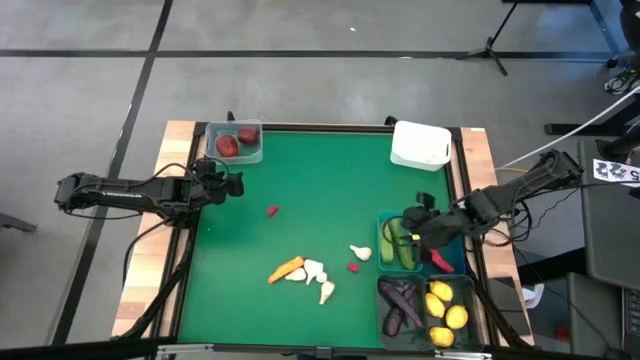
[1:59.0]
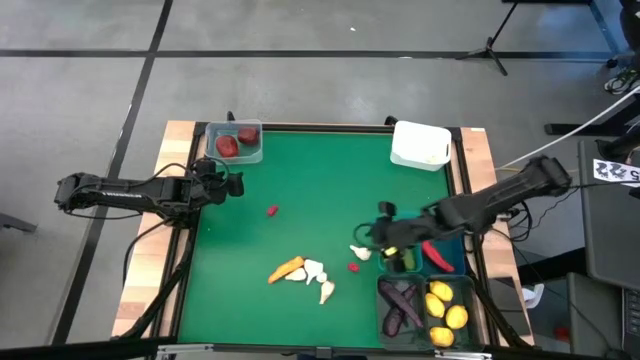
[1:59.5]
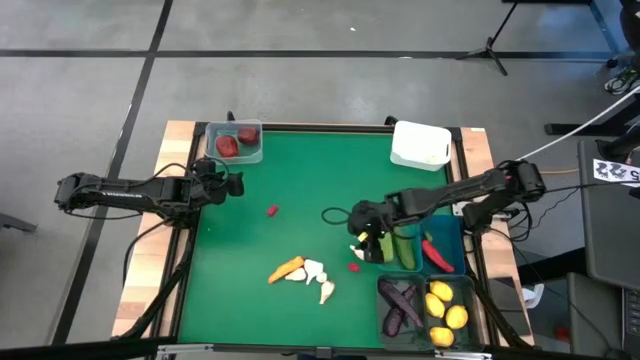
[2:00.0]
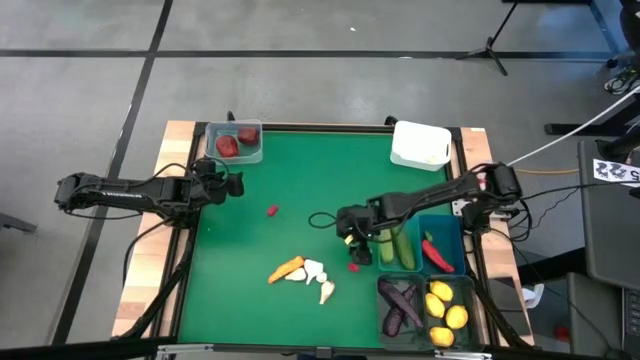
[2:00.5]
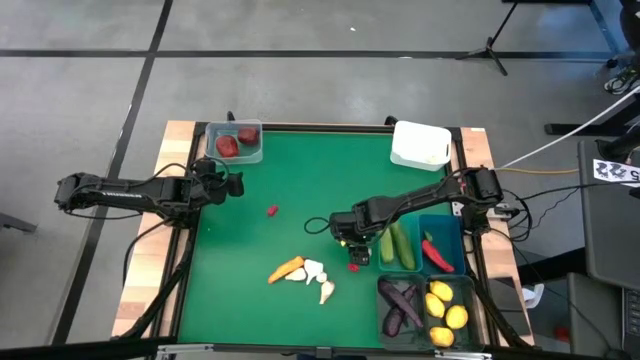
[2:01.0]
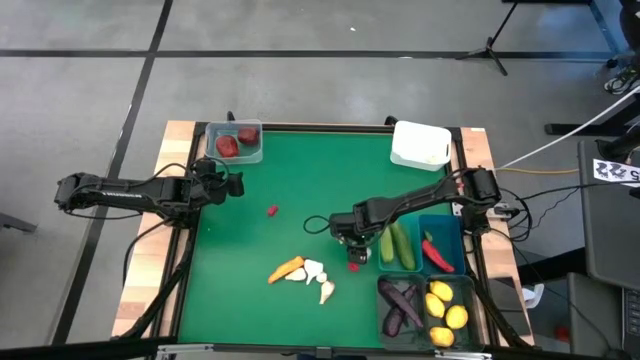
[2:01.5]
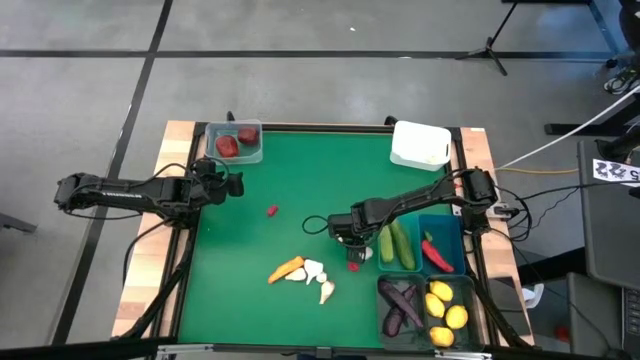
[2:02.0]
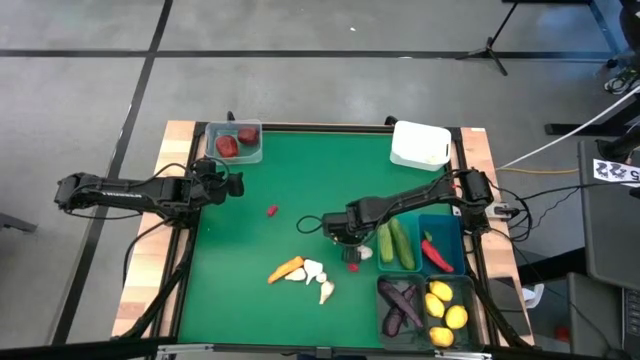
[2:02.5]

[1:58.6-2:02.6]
Task: Sort produce into baskets
Put the garlic into the white bin

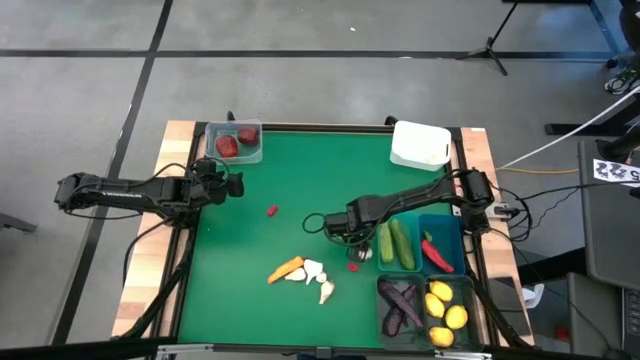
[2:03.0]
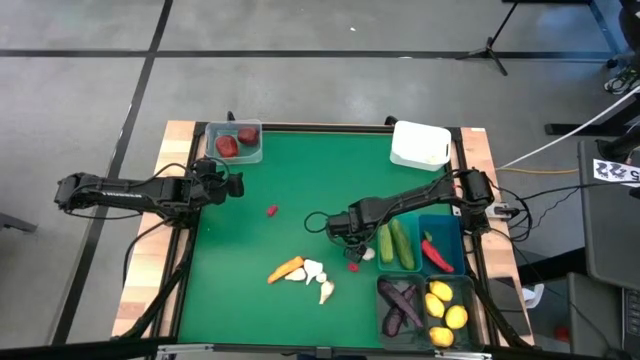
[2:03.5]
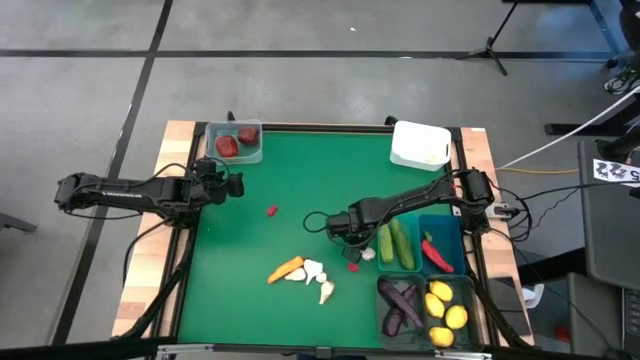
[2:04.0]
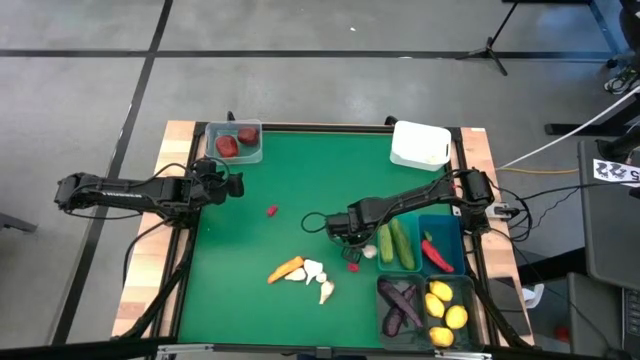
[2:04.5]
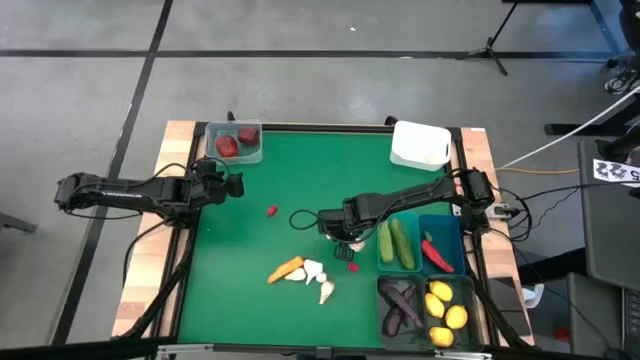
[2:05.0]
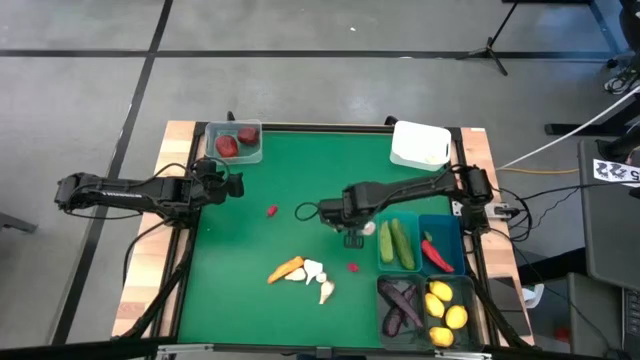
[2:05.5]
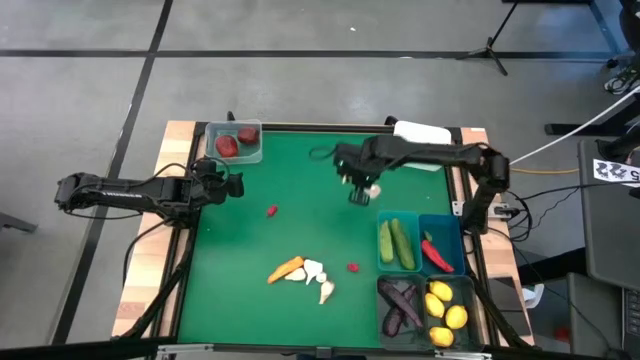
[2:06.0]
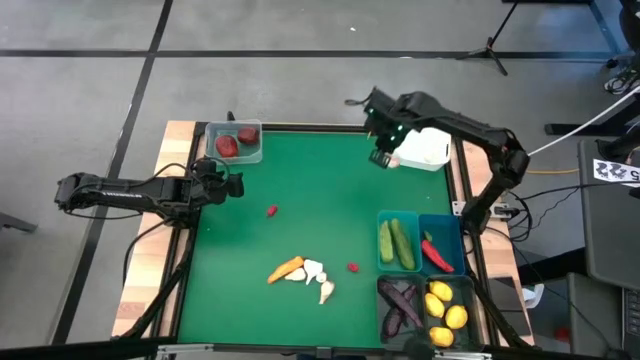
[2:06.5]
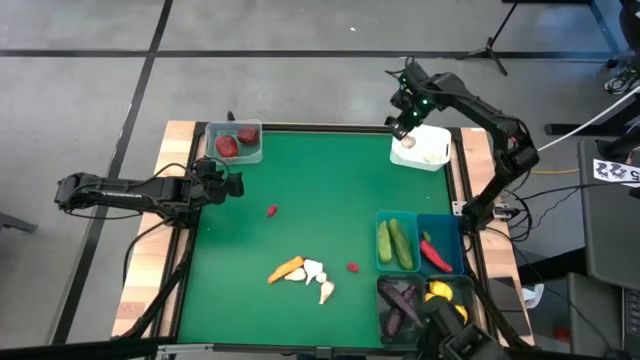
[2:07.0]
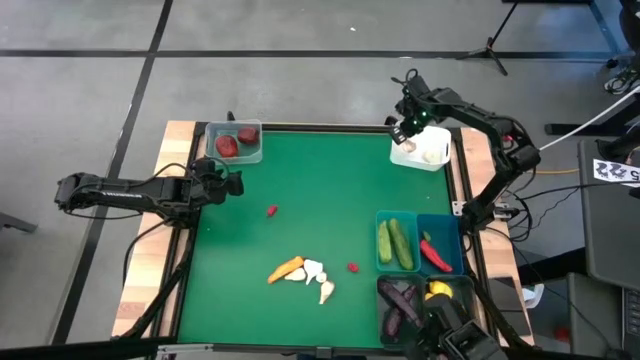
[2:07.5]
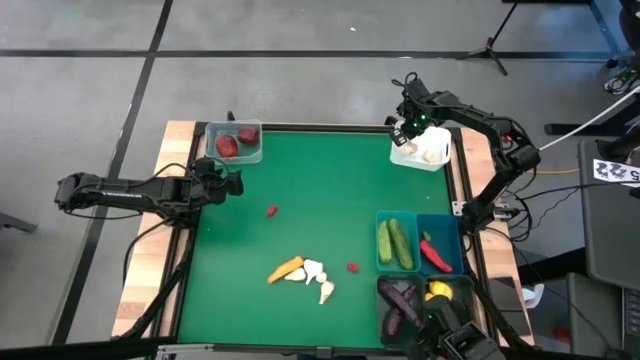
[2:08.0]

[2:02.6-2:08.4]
Put the garlic into the white bin

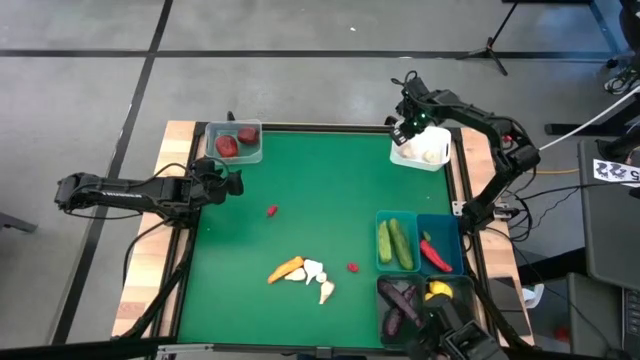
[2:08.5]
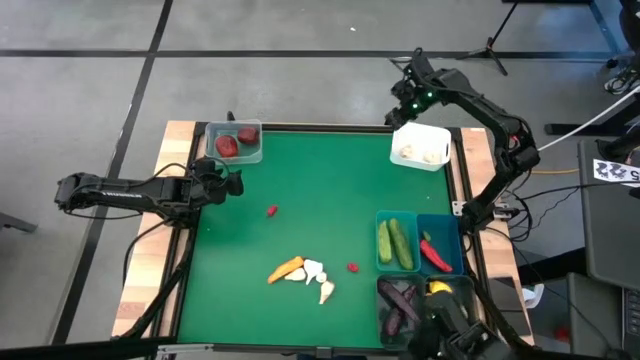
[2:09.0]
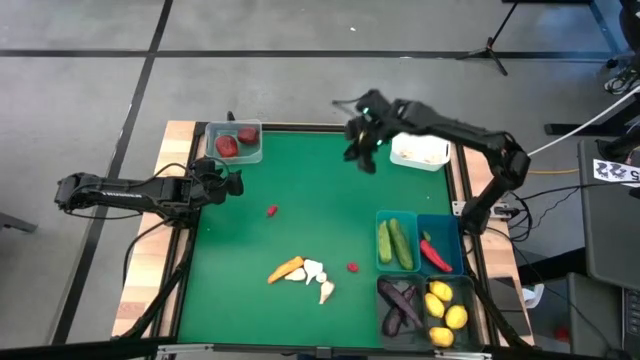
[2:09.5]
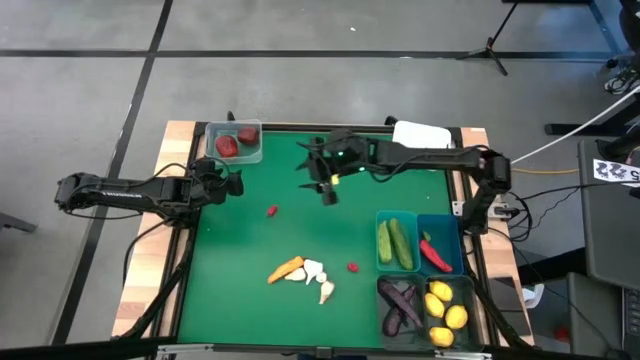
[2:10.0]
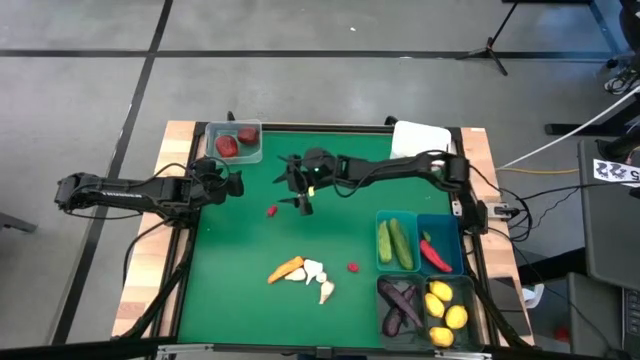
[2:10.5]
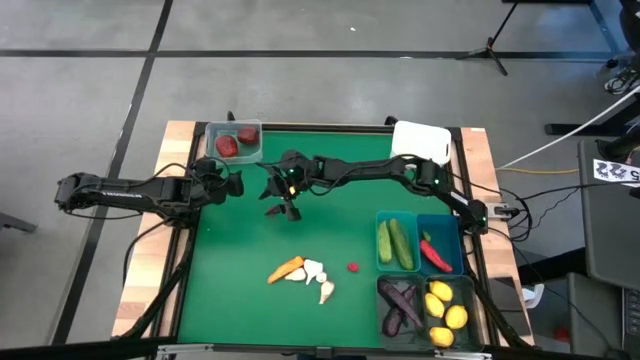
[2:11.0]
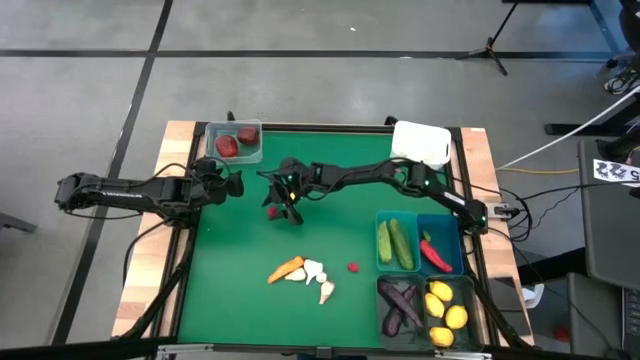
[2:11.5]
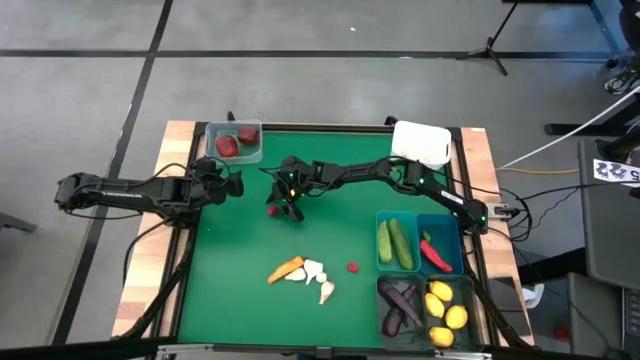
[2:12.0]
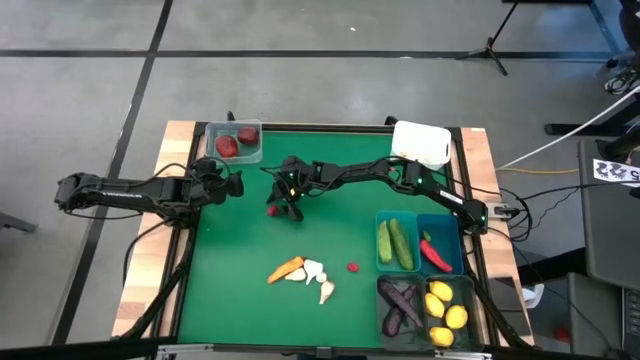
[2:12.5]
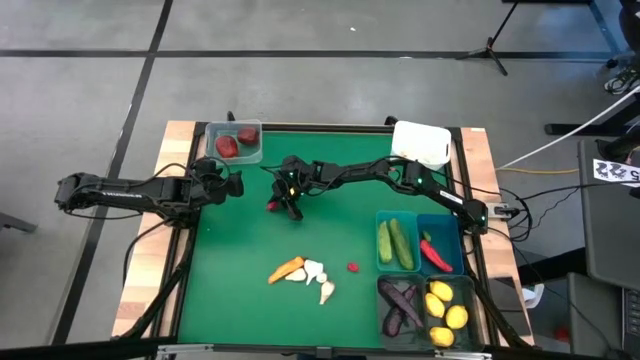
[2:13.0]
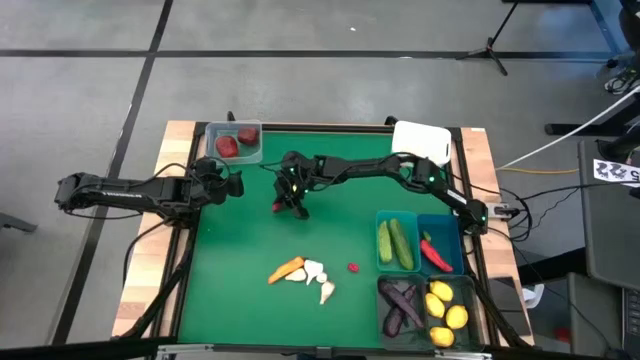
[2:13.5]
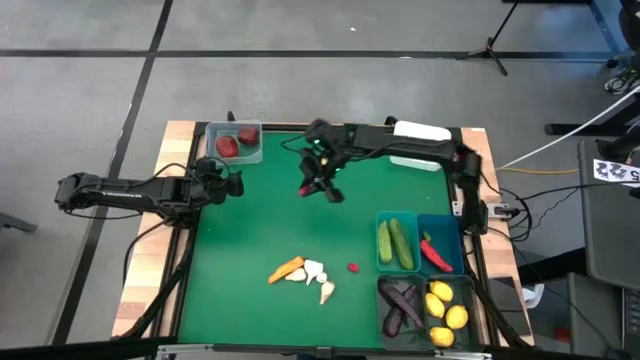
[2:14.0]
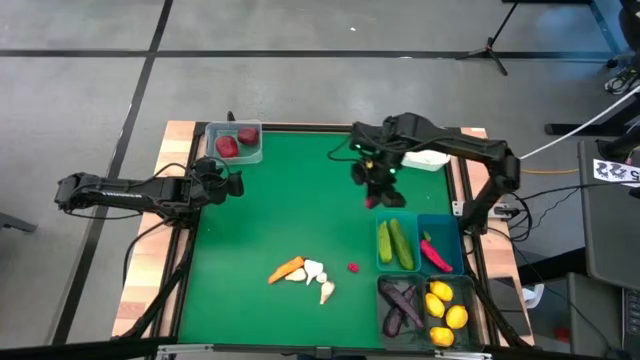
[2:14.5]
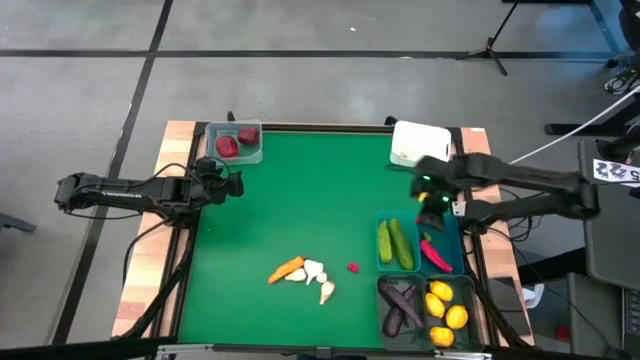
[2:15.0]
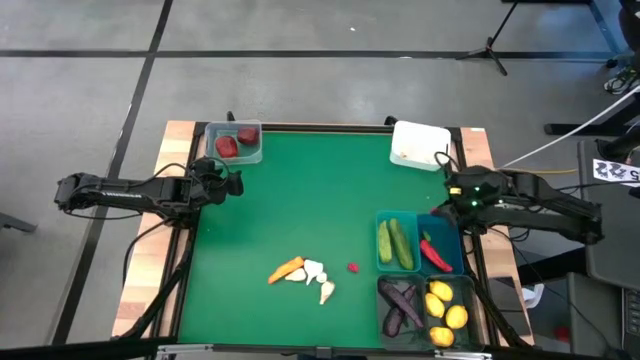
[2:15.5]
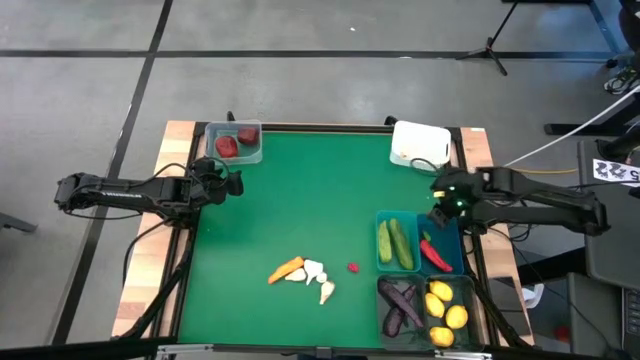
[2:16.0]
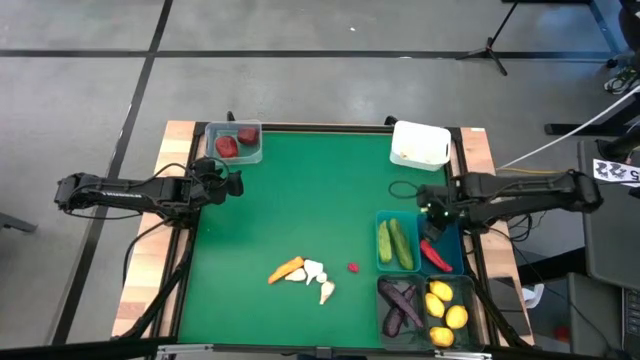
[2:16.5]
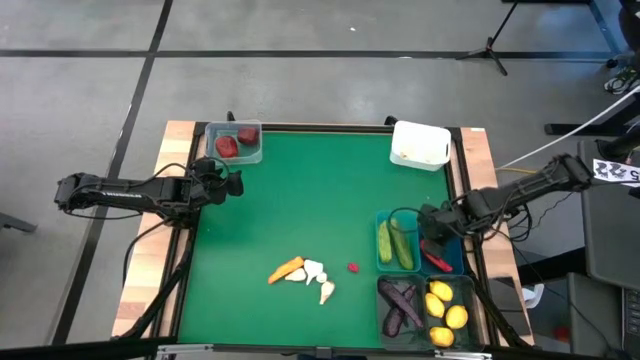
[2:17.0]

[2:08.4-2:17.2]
Put the red bell pepper into the blue bin

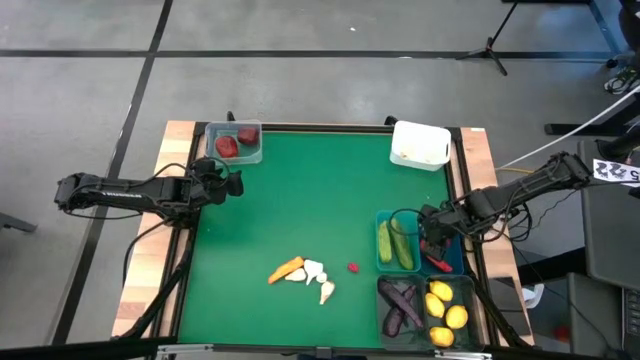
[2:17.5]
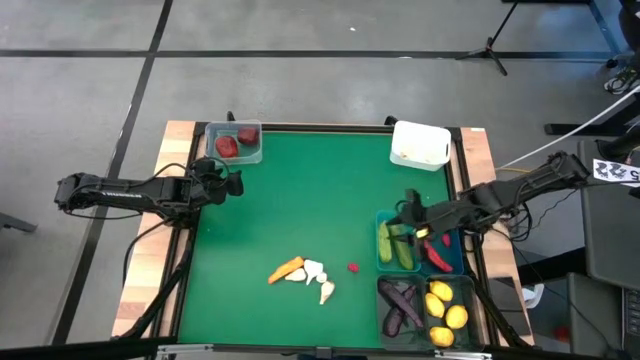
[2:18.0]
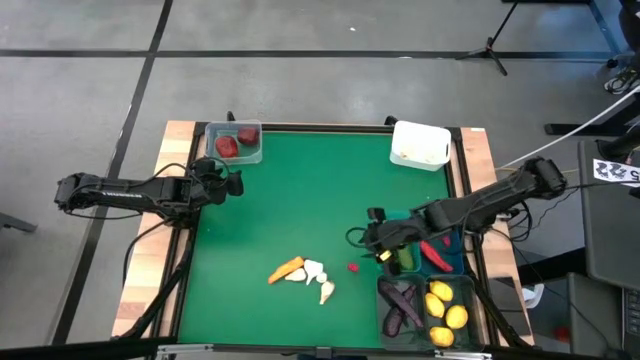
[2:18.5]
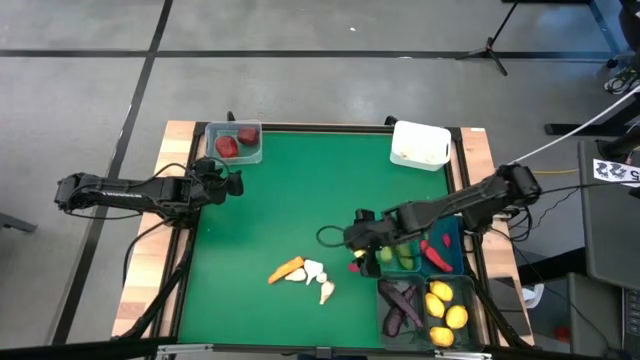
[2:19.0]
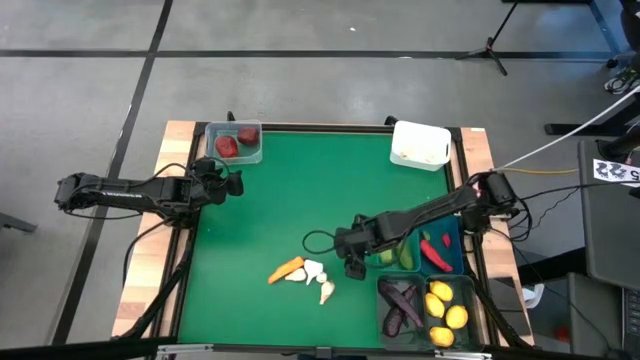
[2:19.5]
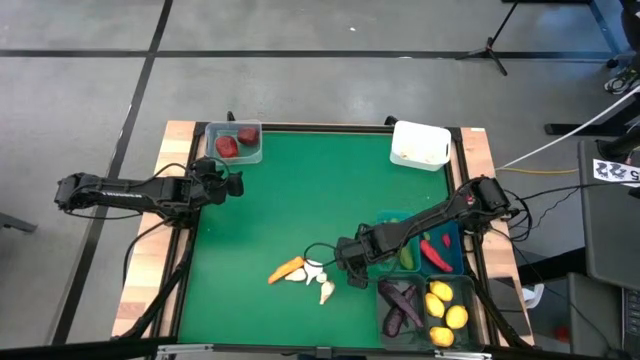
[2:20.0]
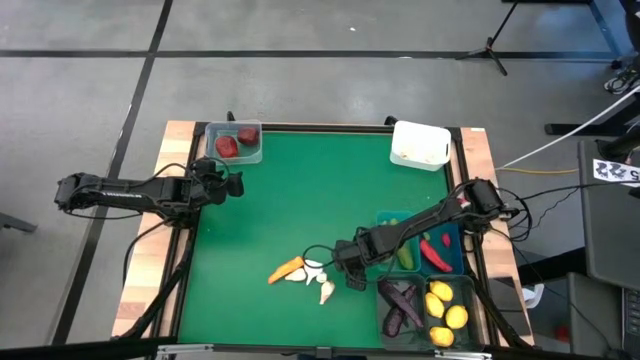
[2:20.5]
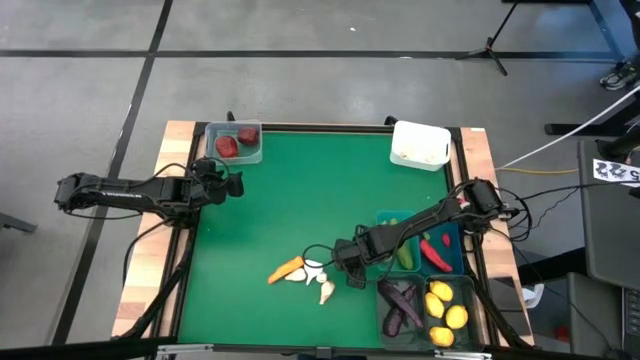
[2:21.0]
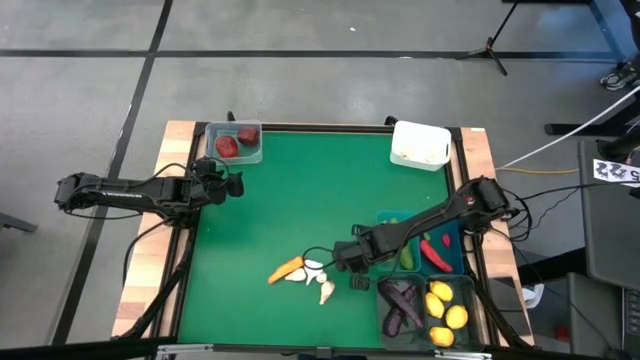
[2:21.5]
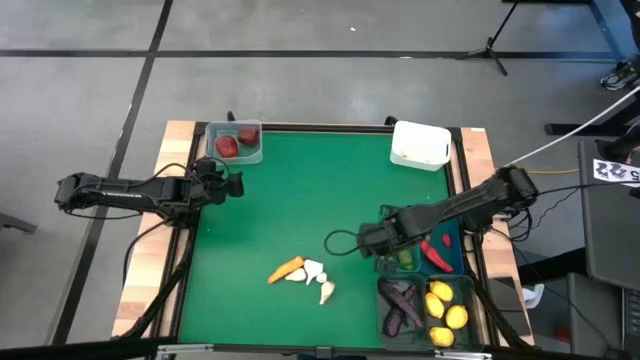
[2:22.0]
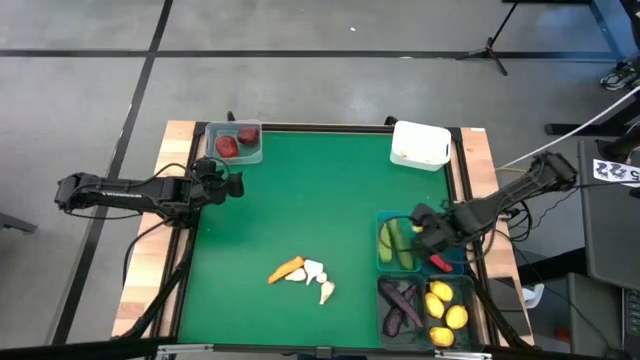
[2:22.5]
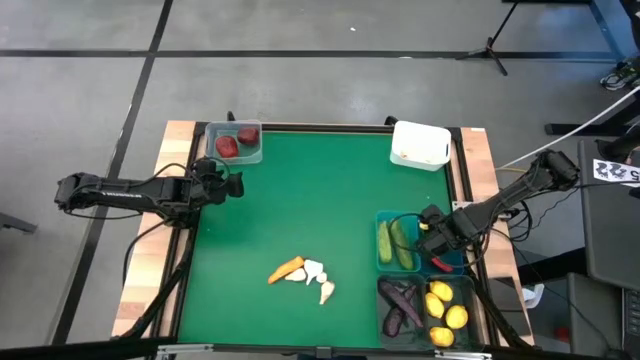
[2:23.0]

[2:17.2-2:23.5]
Put the red bell pepper into the blue bin
